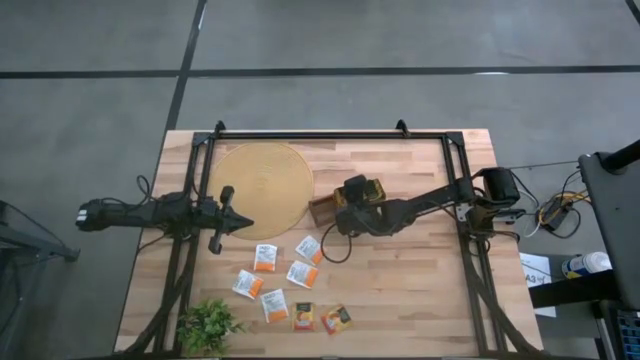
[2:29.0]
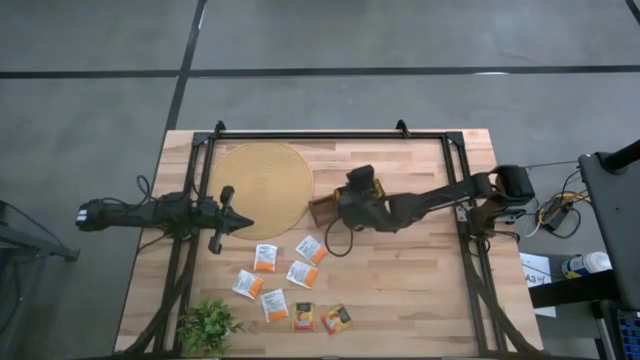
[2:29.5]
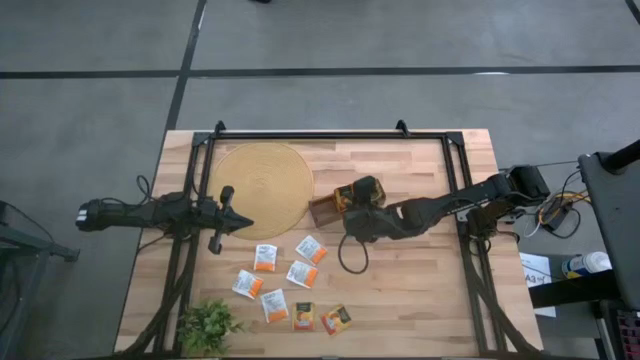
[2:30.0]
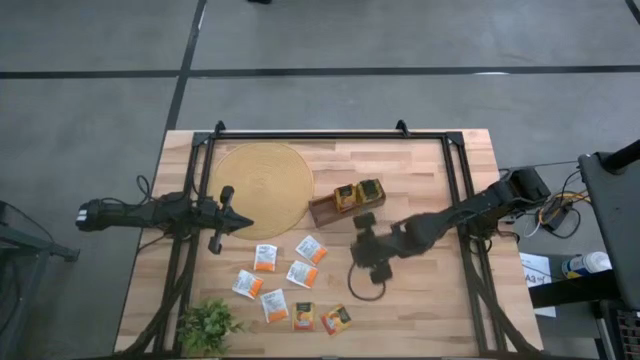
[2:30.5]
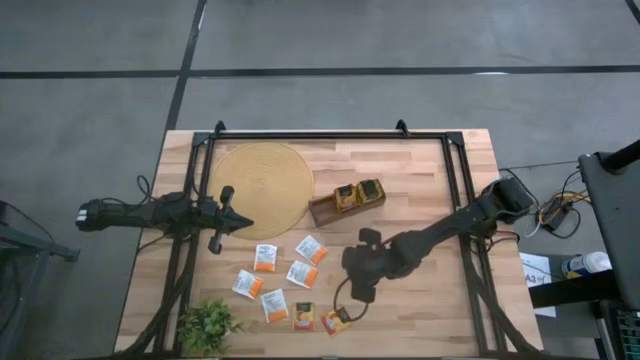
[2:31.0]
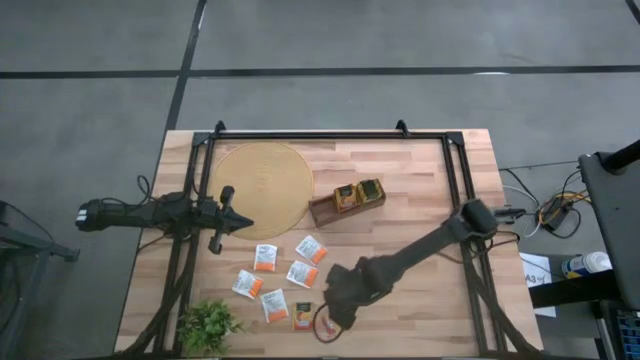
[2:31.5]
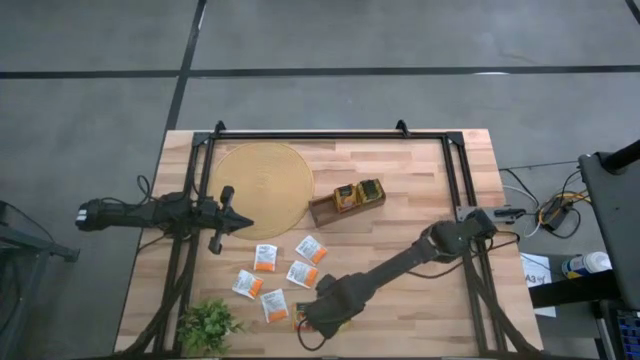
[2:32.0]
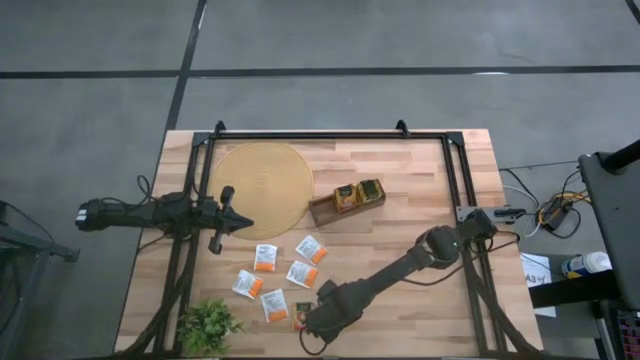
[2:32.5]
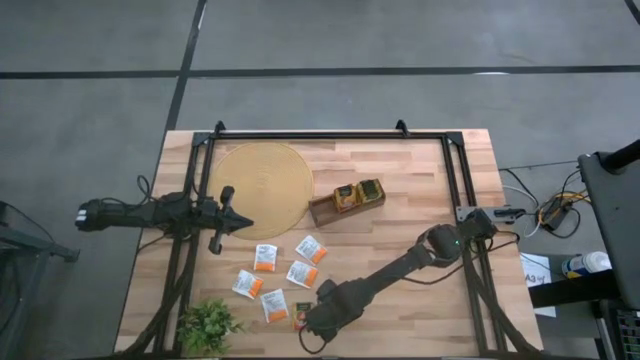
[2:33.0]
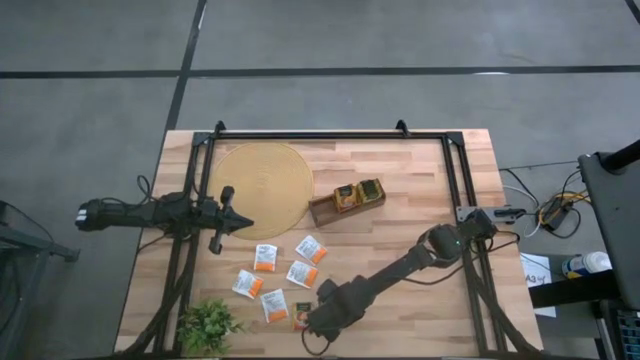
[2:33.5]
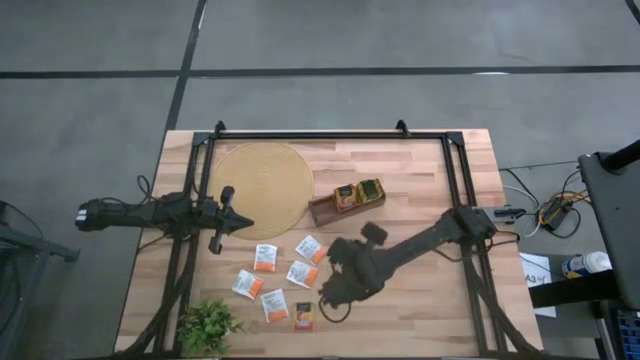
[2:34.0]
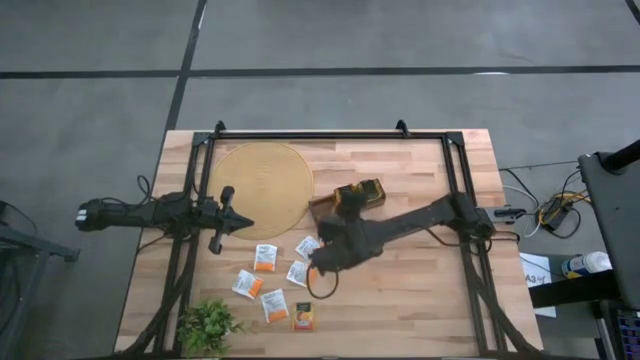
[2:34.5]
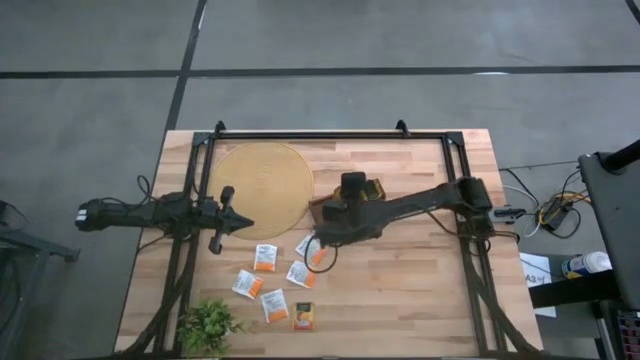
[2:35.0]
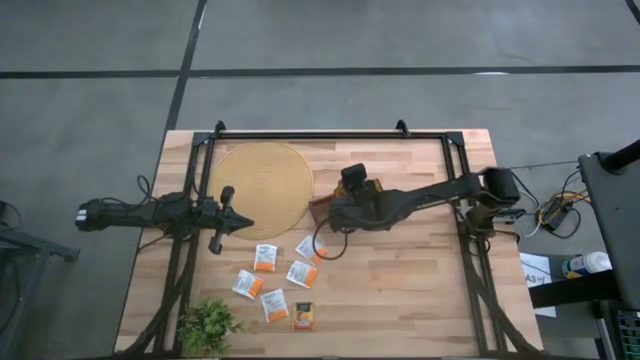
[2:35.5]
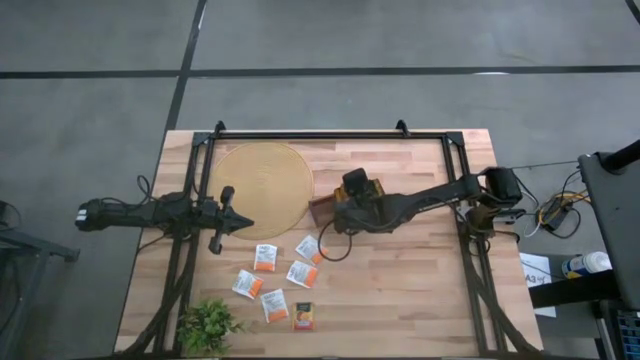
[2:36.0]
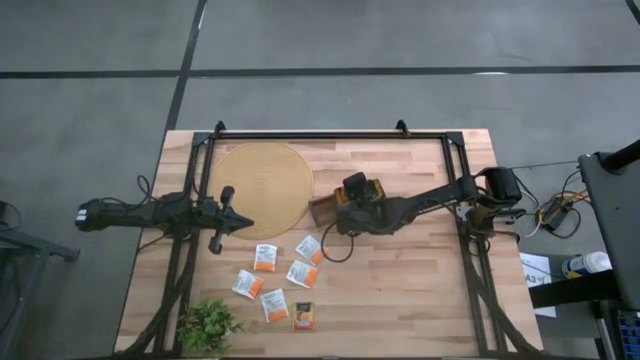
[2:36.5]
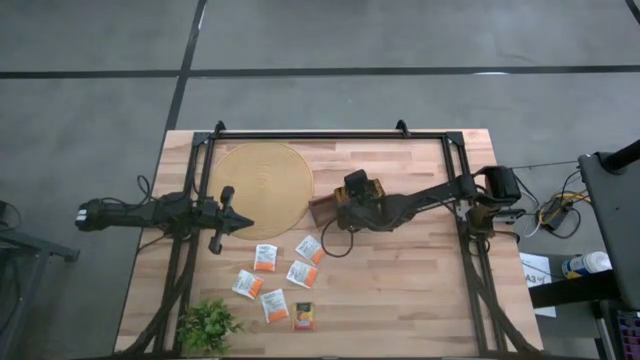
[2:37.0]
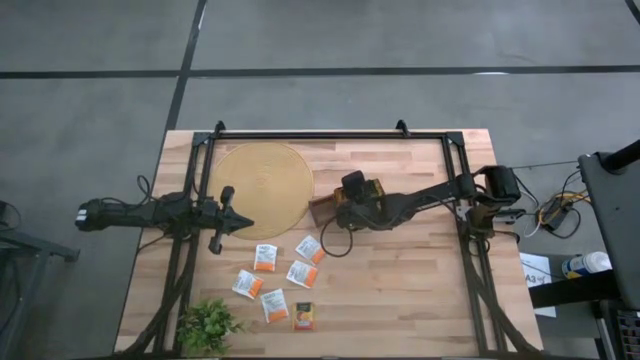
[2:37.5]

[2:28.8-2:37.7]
Task: Pick & Place Tea
Put the orange tea bag into the middle section of the wooden organizer

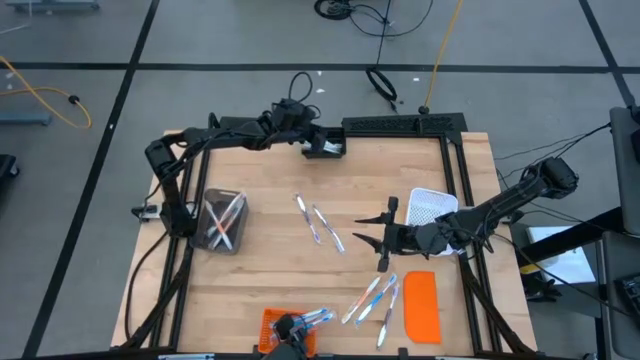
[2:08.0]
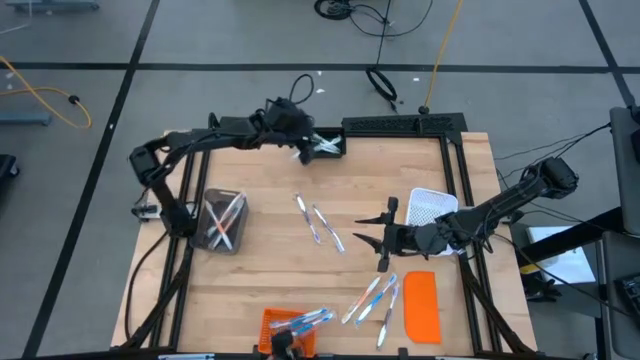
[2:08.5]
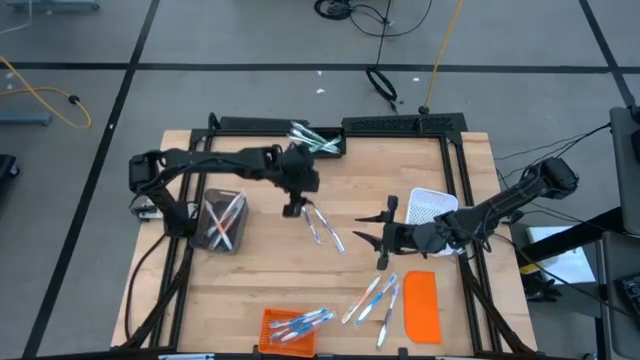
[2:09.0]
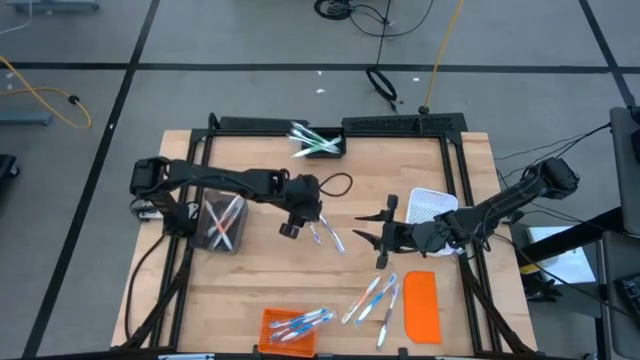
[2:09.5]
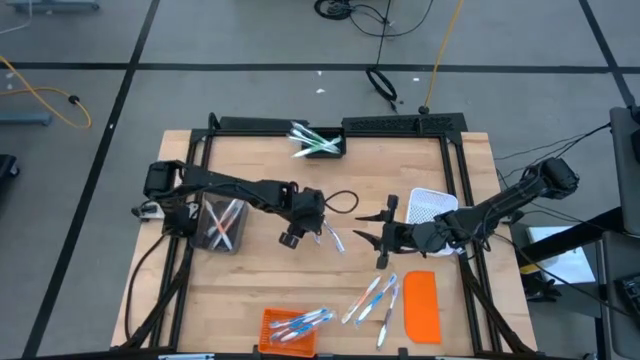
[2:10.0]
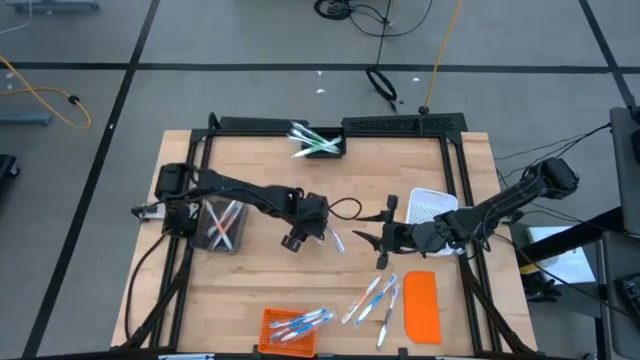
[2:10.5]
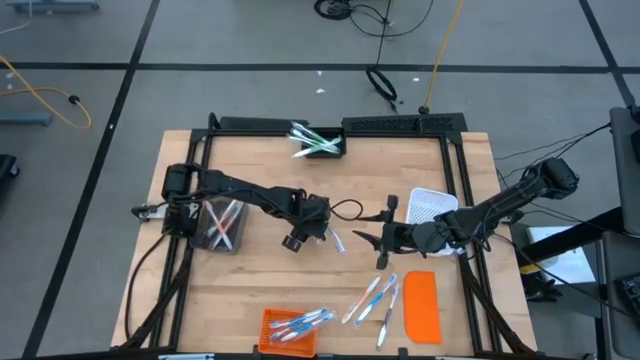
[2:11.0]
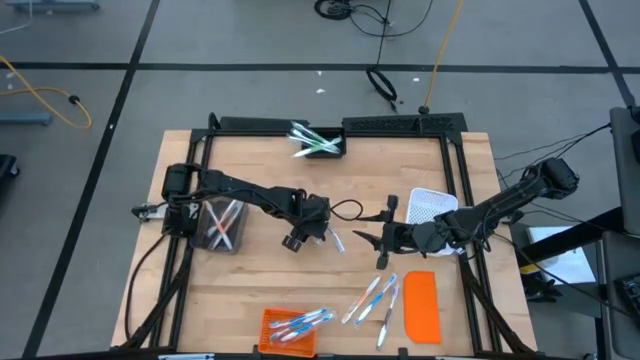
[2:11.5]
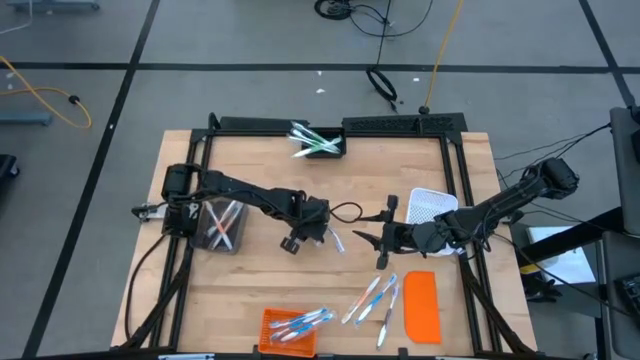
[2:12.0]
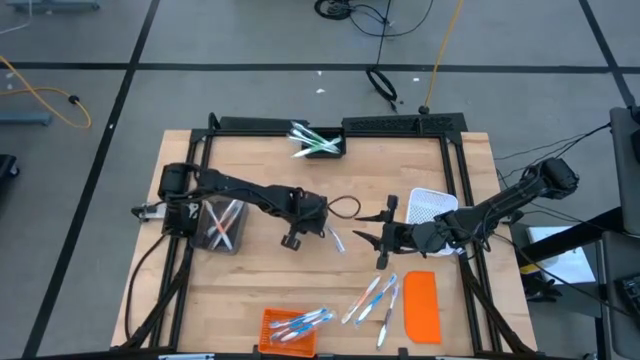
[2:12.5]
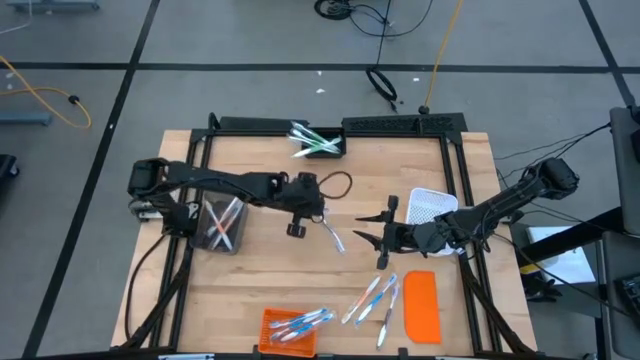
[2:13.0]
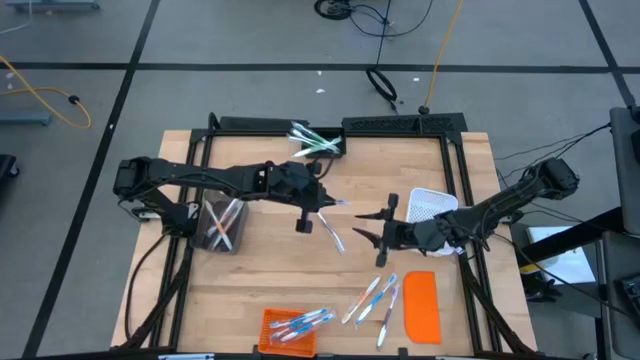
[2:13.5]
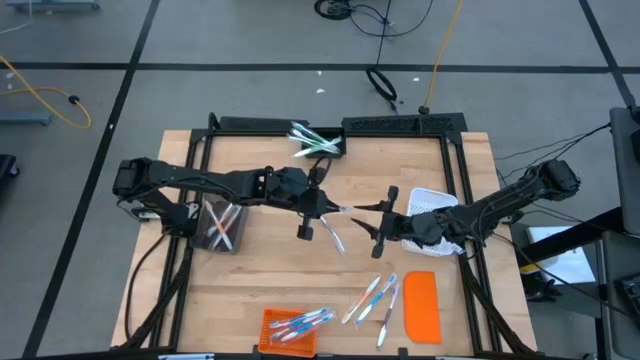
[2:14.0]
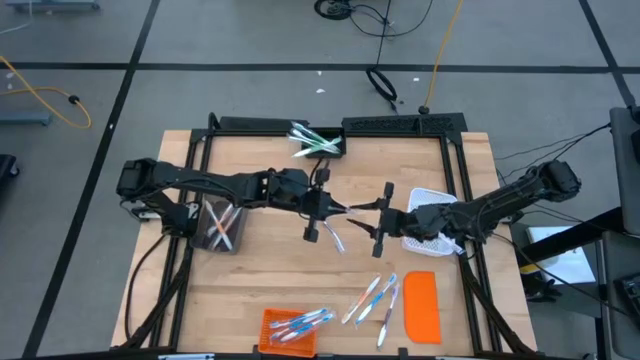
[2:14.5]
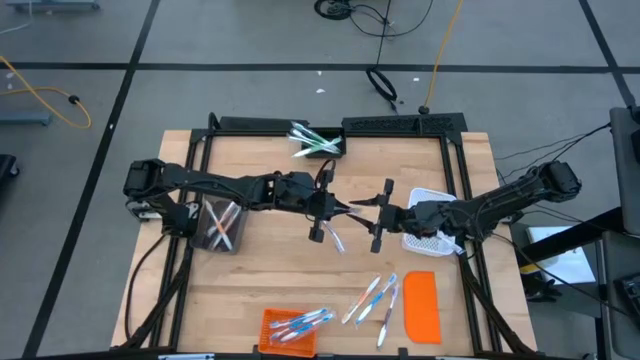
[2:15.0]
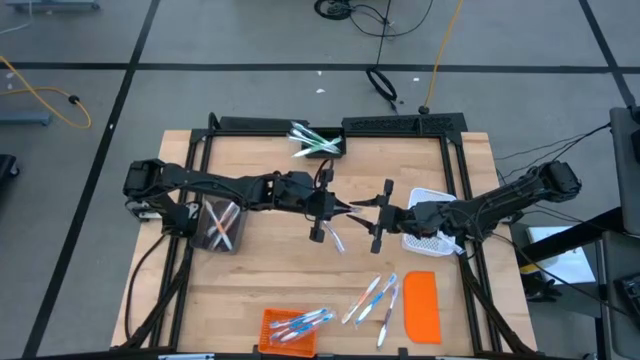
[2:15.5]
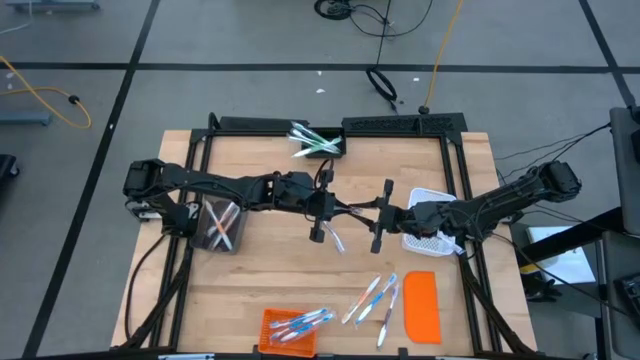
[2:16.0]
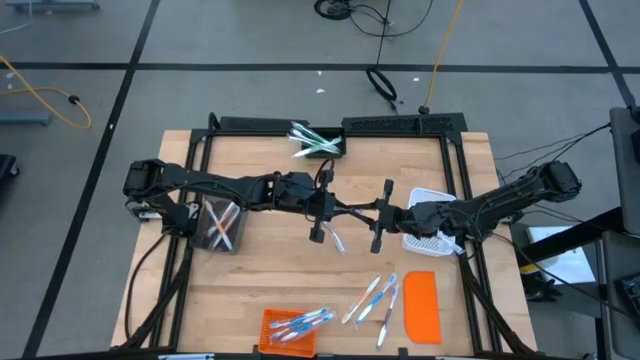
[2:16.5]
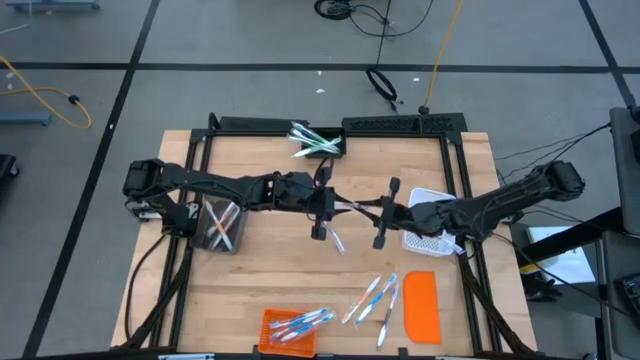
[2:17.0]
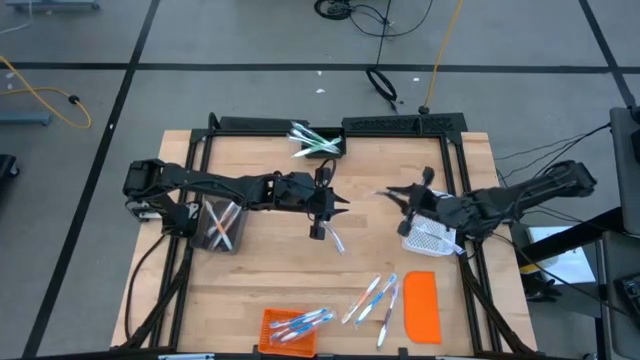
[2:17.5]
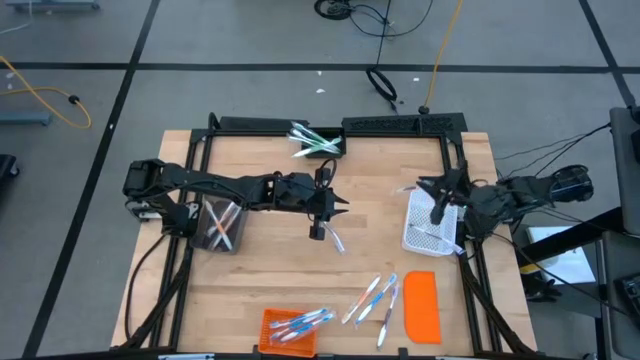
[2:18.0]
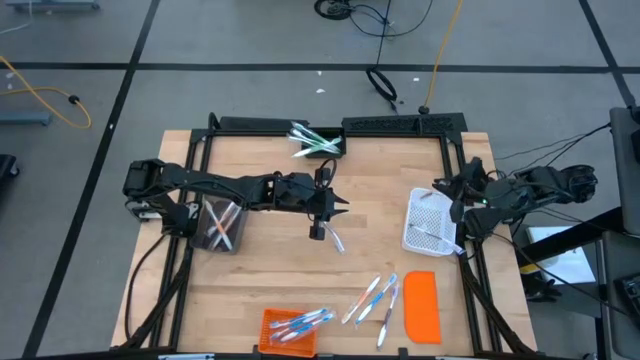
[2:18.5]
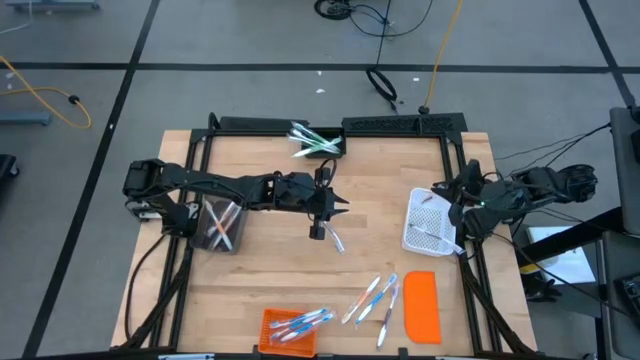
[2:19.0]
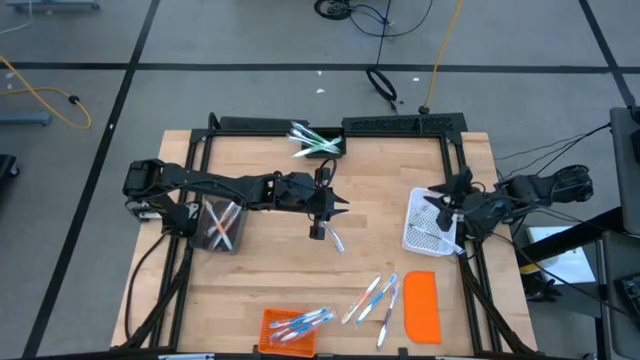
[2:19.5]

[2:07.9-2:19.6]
Task: Pick & Place Toothbrushes
Put the purple toothbrush into the white bin
